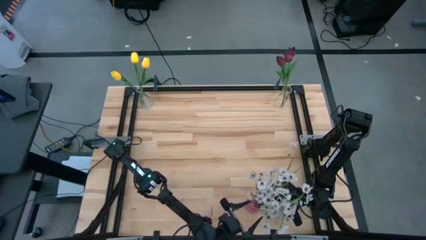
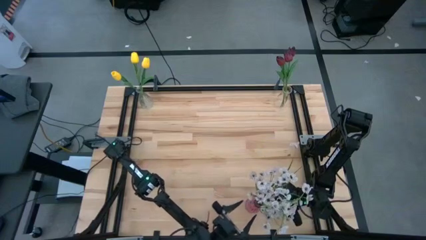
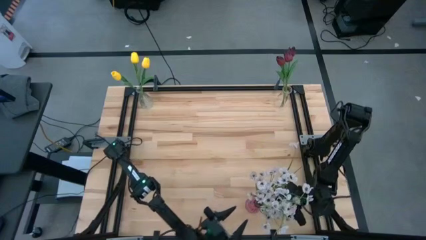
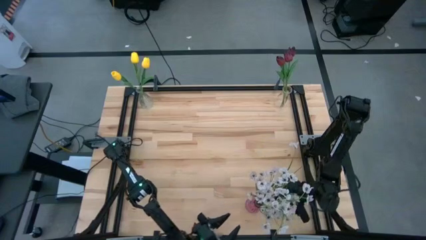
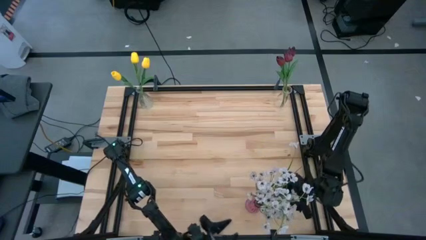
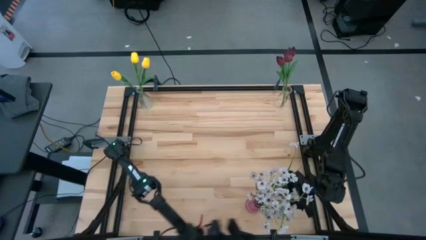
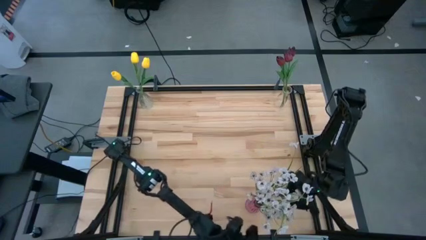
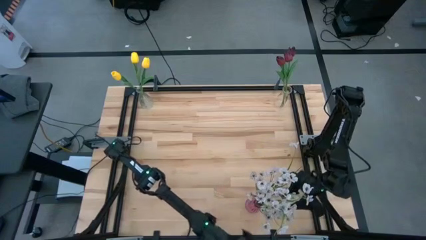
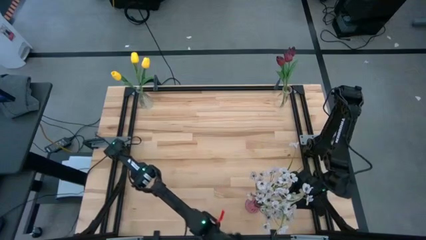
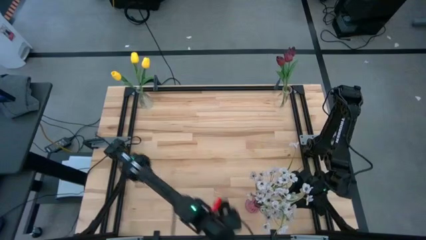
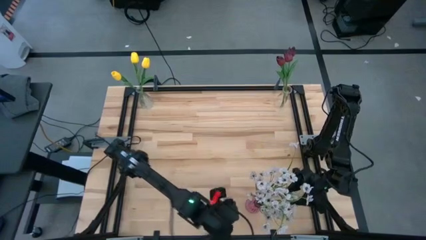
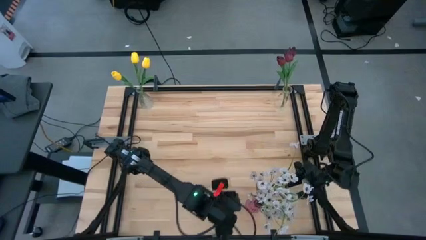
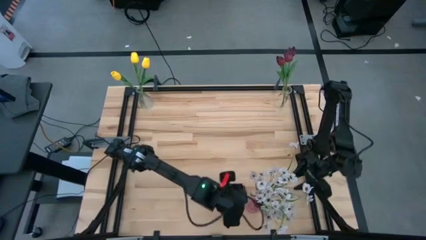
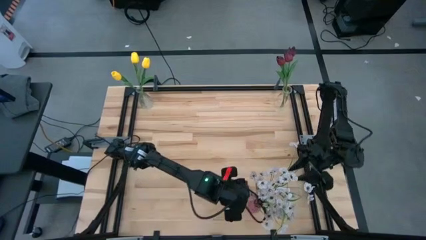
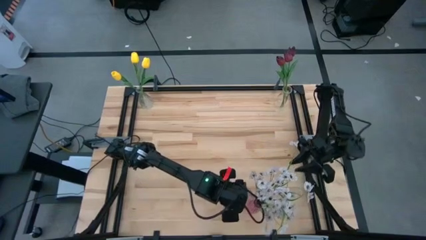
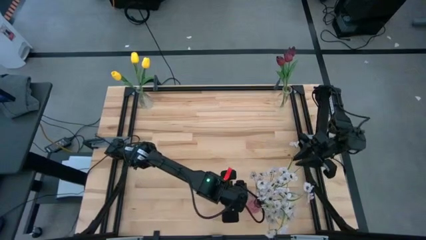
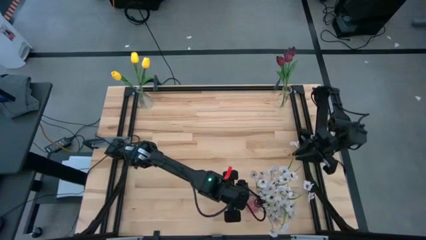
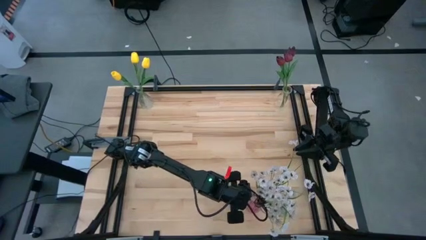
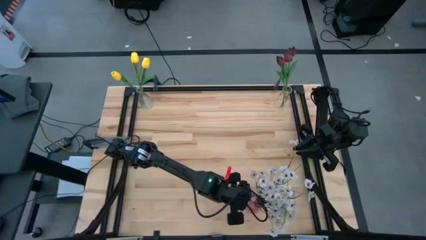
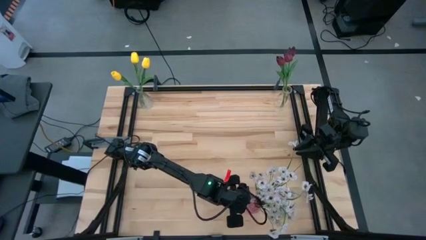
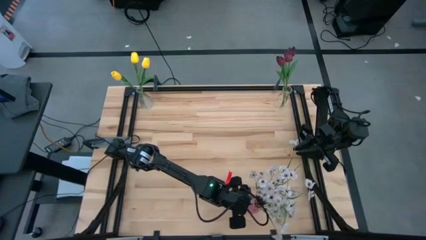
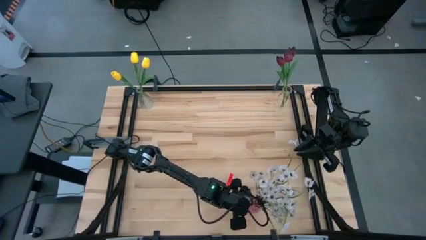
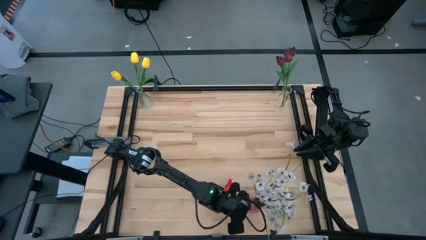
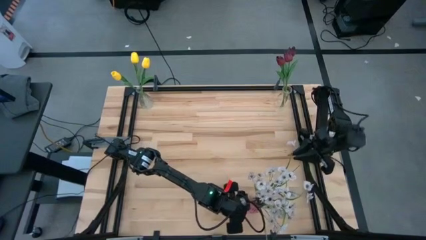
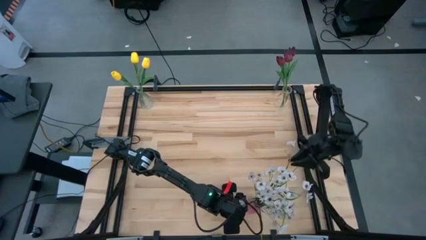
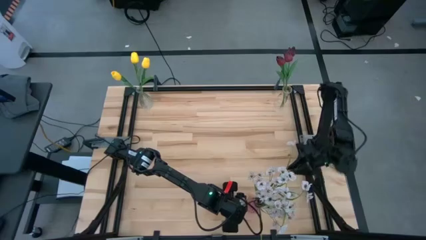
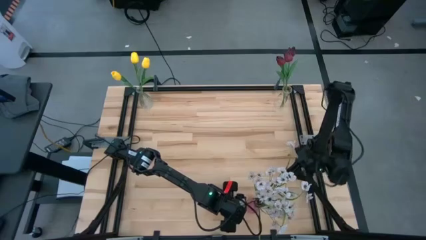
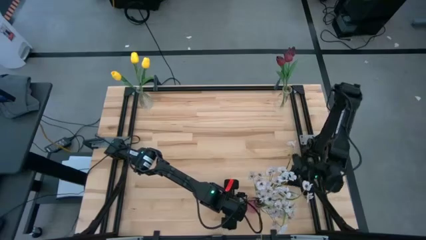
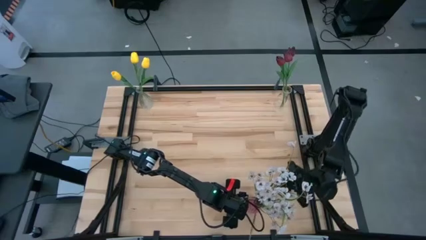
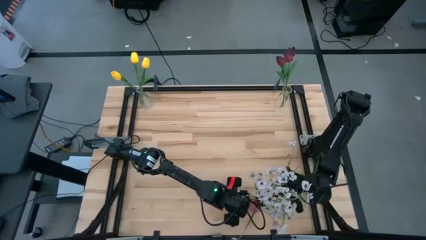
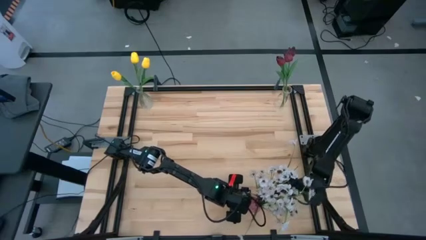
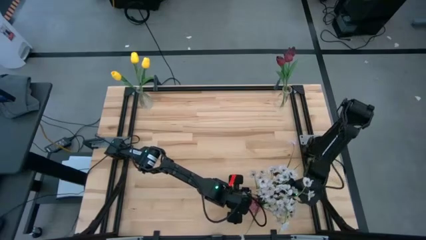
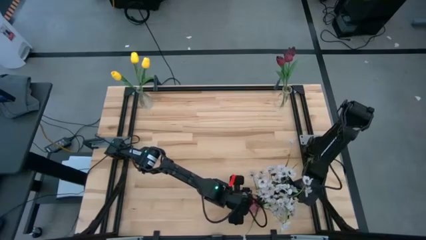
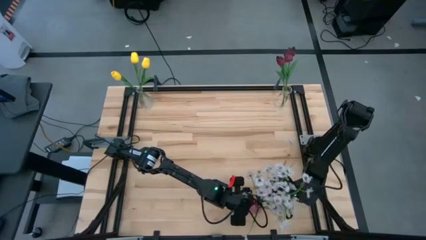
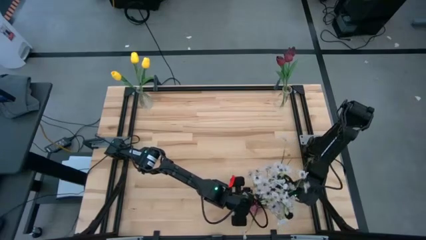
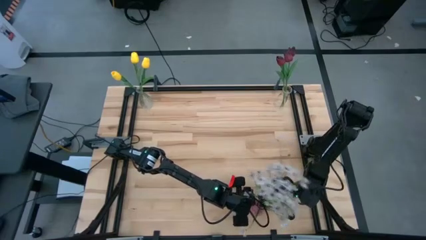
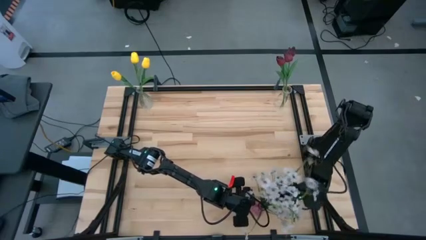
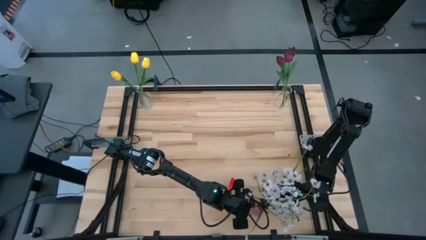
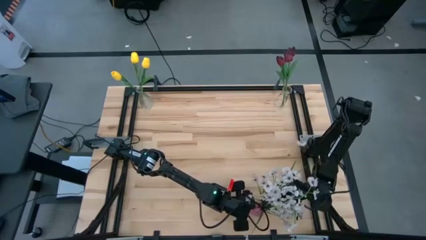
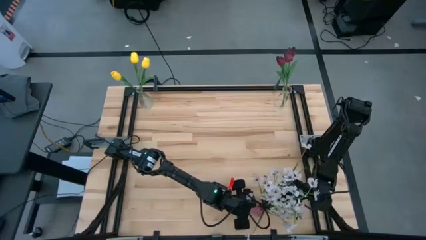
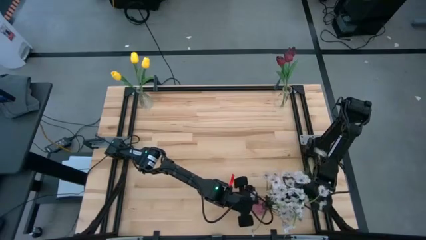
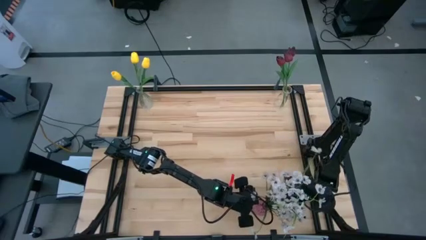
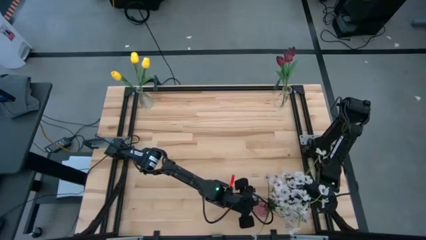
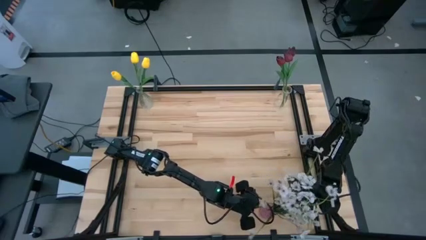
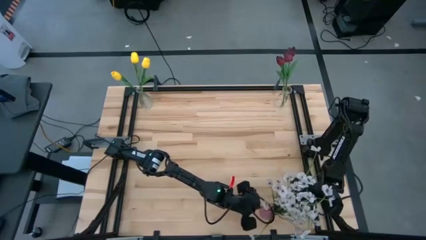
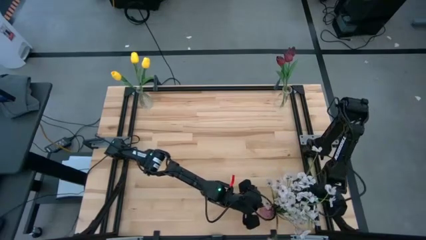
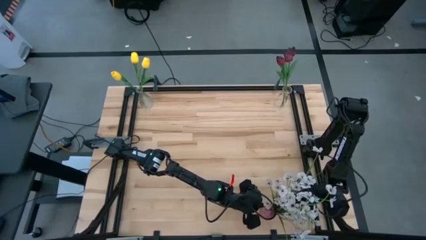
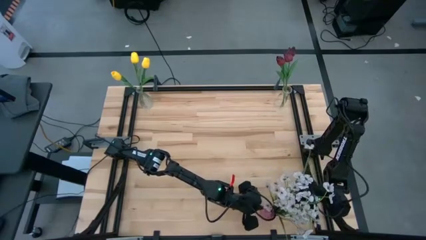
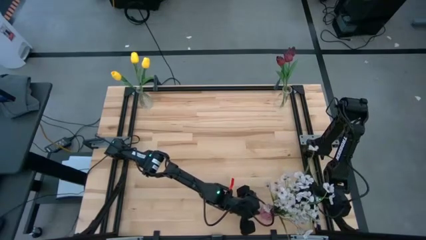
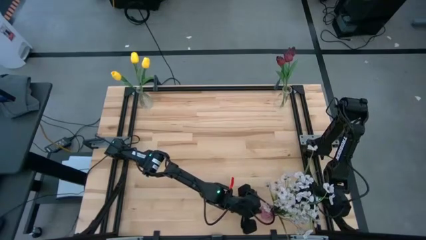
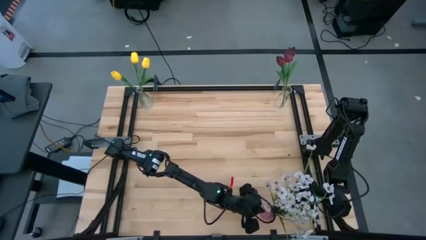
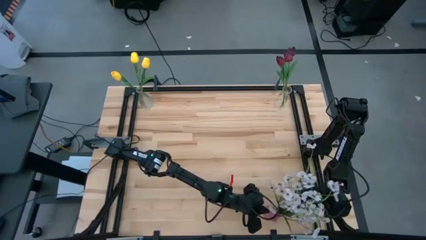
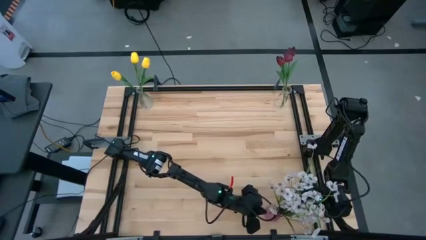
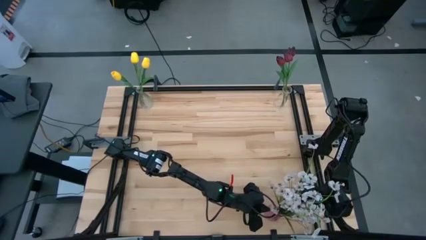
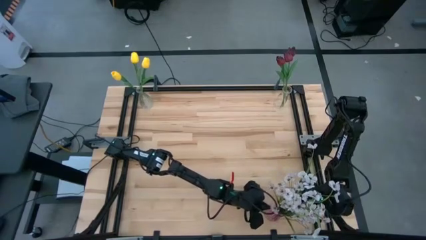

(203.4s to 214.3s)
Task: Sort flowers into vase by color
Adjust the purple vase
